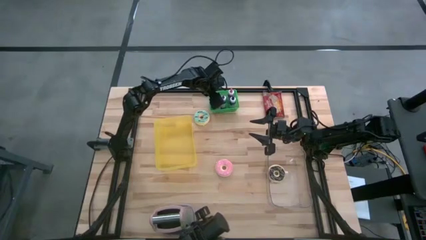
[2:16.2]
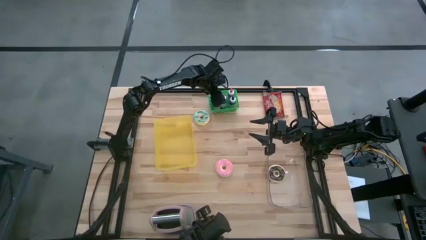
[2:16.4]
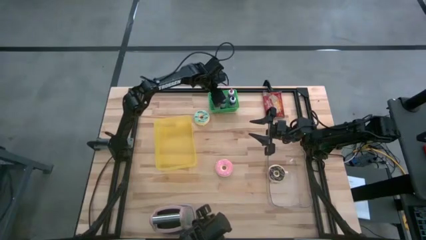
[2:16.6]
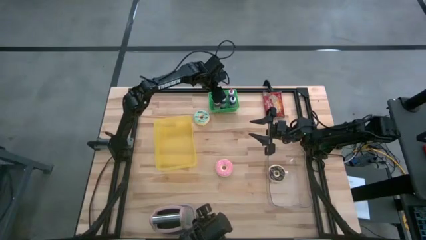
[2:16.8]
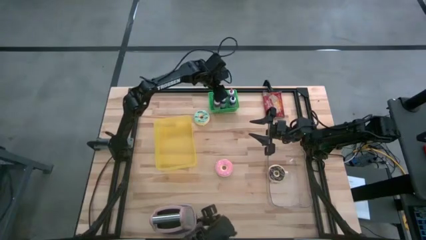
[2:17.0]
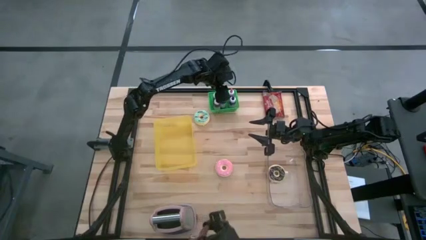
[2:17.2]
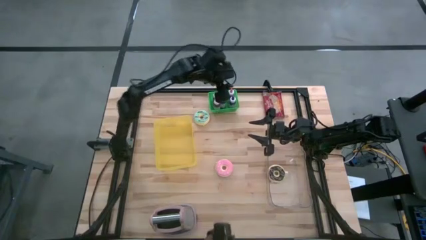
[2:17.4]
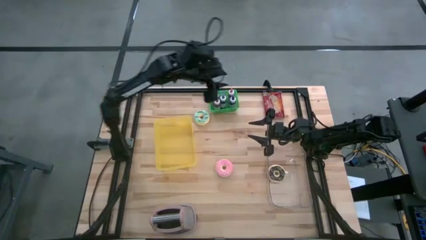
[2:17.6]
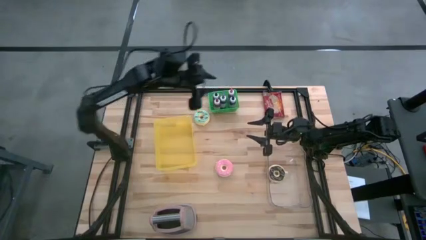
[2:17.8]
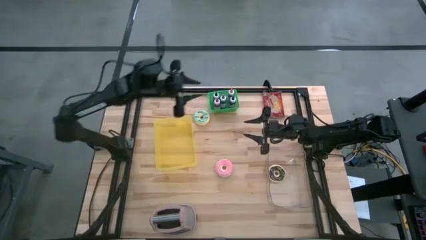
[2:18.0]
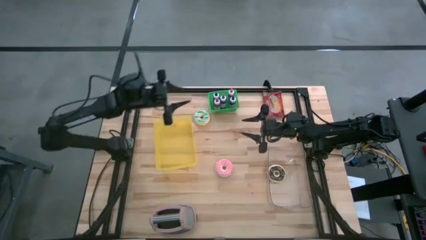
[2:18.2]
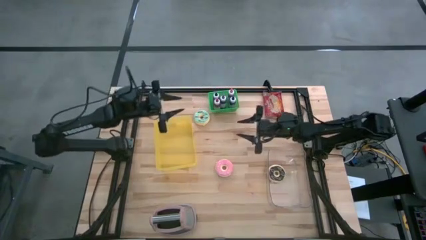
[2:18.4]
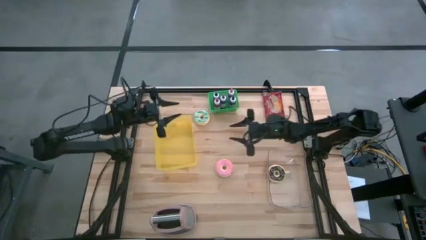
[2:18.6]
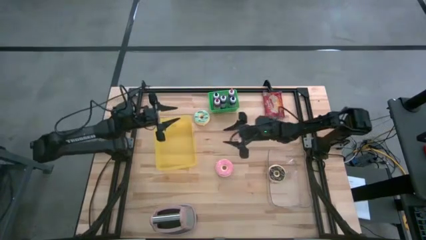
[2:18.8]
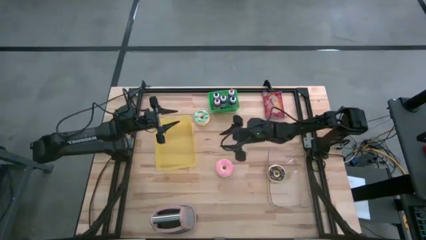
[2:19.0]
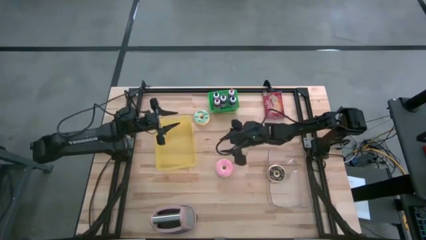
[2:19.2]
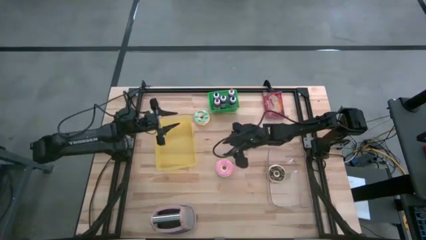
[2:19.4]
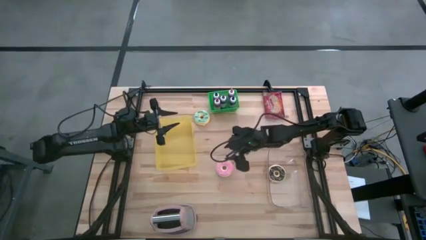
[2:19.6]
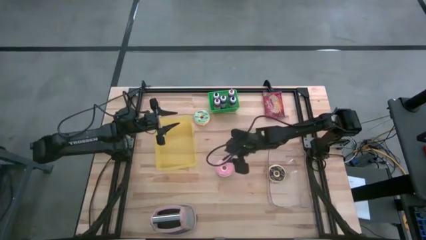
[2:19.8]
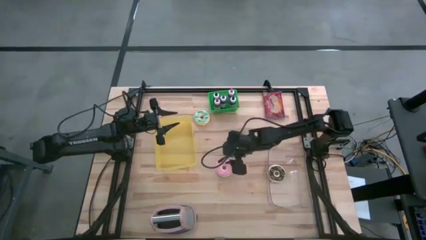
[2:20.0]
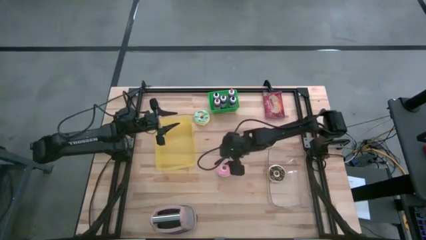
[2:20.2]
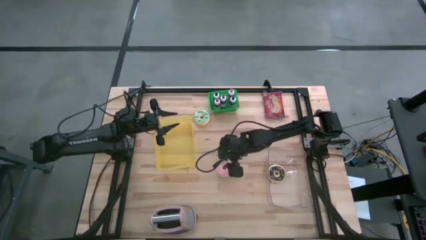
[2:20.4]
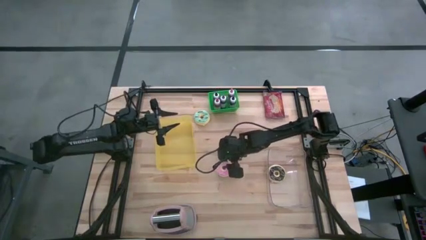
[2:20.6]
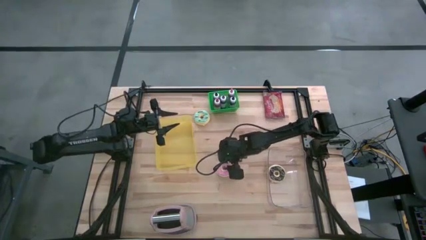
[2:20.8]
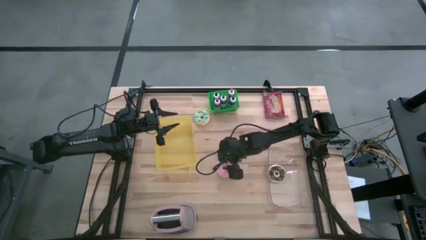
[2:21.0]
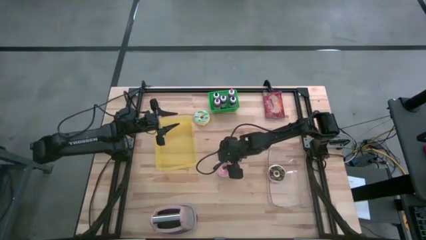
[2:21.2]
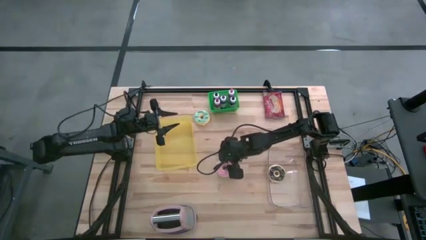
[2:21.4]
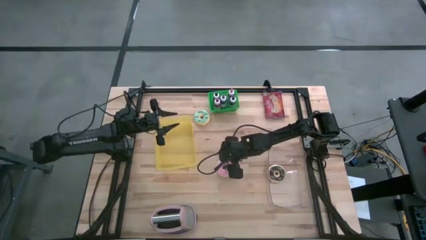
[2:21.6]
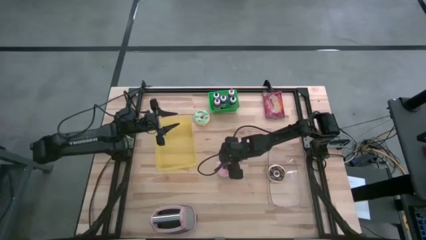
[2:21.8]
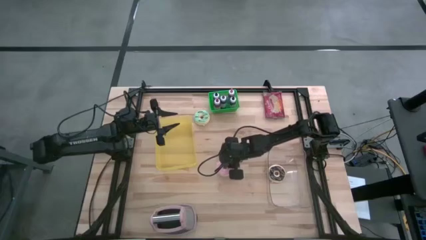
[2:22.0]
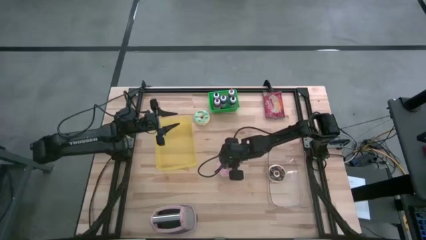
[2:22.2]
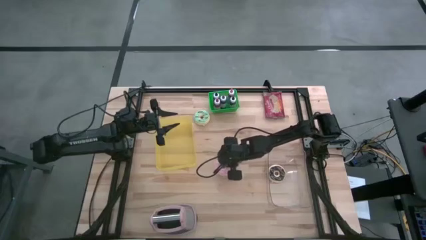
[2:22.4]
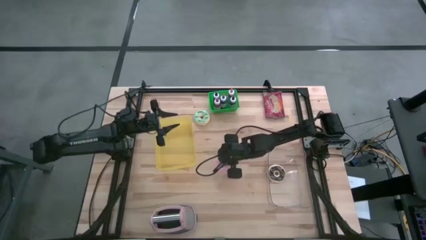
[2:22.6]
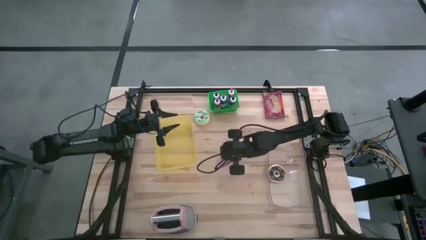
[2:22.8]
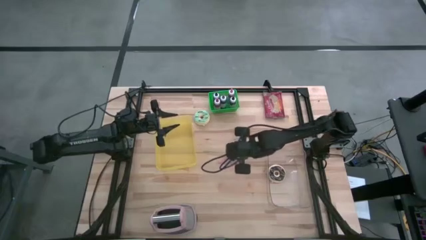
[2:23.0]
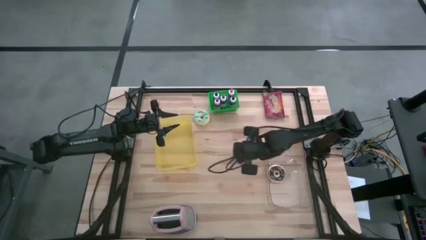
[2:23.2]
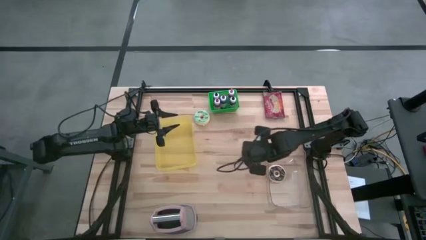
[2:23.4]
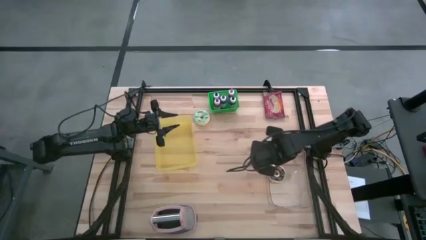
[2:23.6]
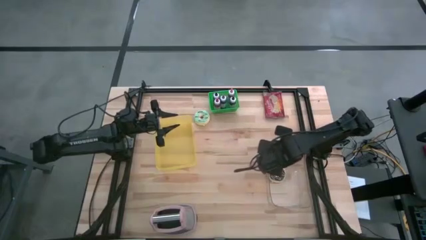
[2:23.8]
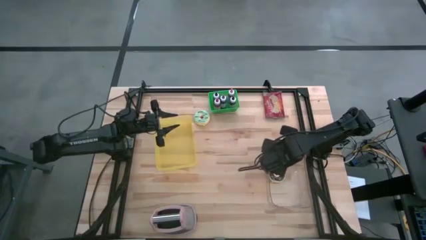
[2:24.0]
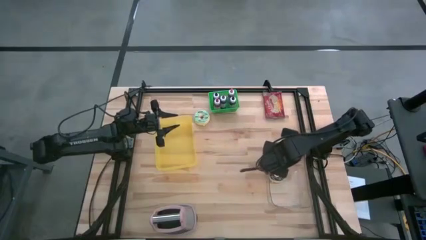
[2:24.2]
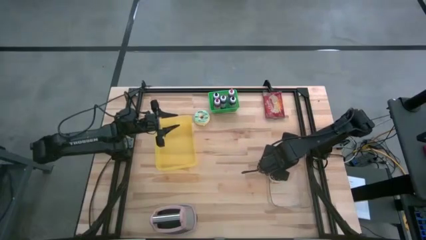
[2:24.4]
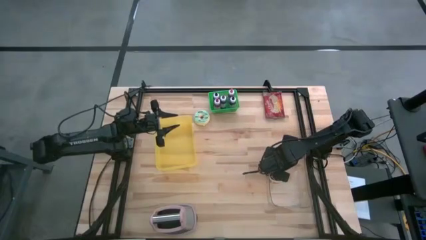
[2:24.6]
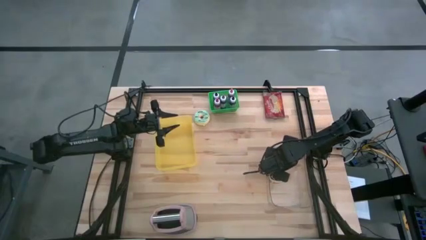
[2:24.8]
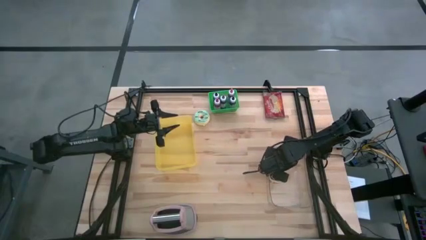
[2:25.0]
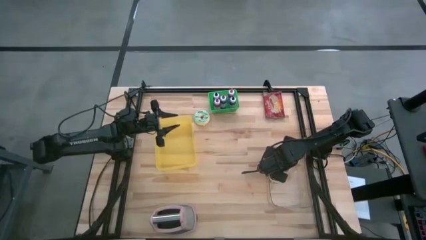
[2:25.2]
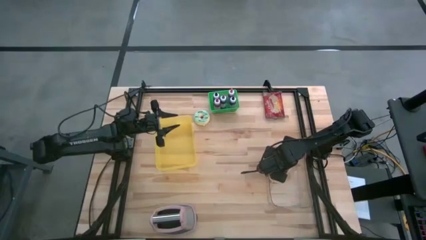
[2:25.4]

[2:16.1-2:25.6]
Task: Pick & Place Food Item
Put the pink donut into the transparent bin

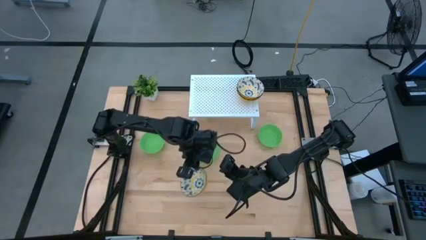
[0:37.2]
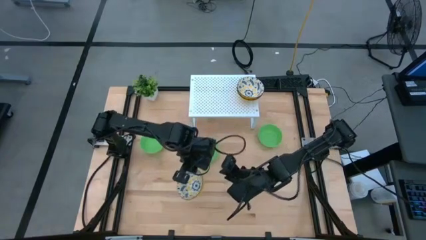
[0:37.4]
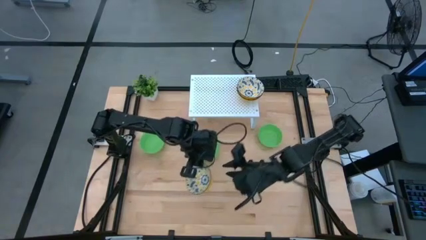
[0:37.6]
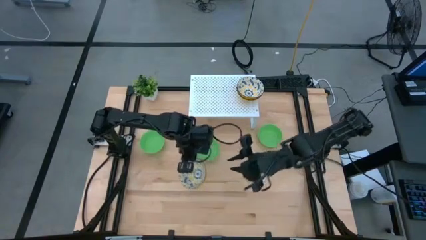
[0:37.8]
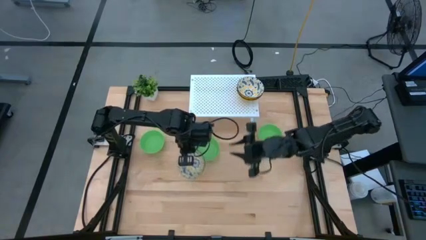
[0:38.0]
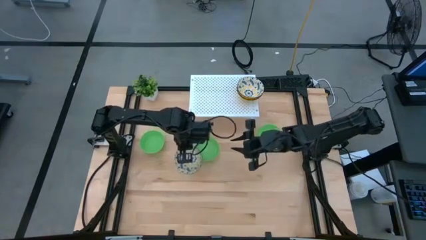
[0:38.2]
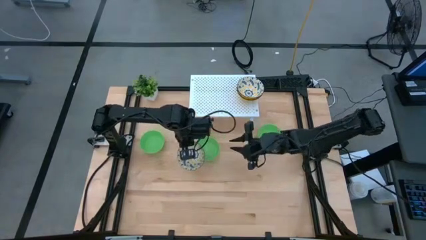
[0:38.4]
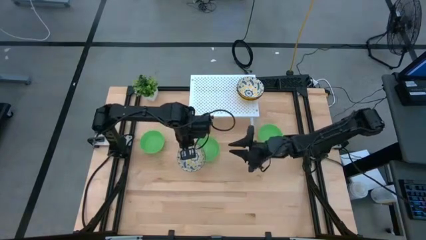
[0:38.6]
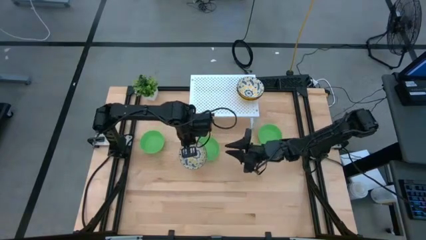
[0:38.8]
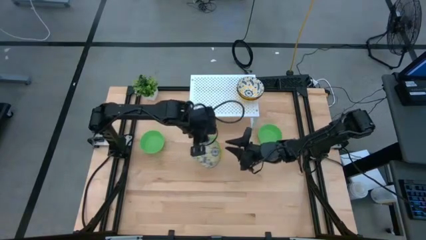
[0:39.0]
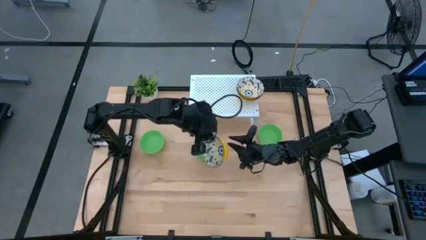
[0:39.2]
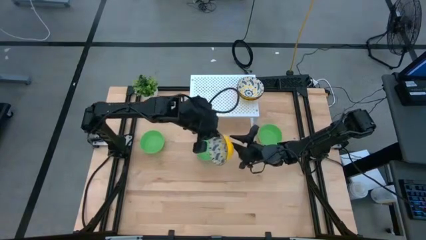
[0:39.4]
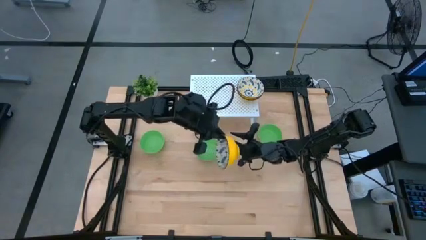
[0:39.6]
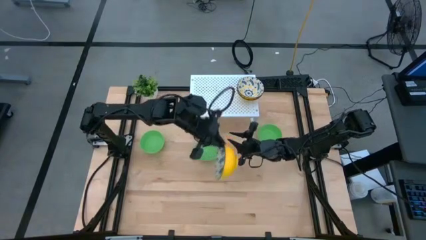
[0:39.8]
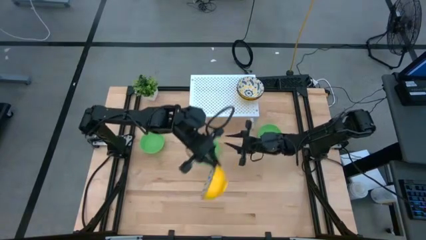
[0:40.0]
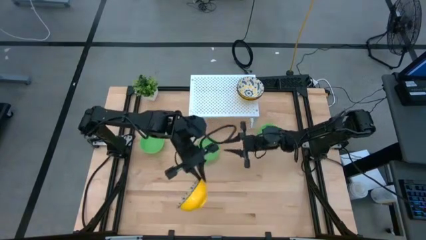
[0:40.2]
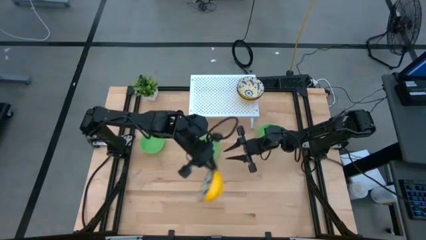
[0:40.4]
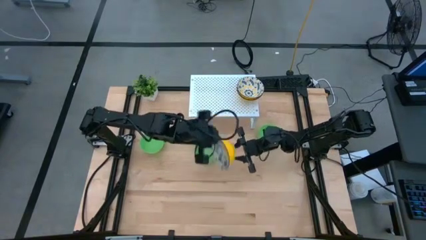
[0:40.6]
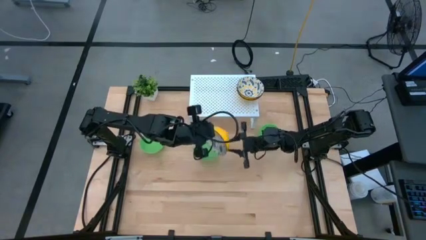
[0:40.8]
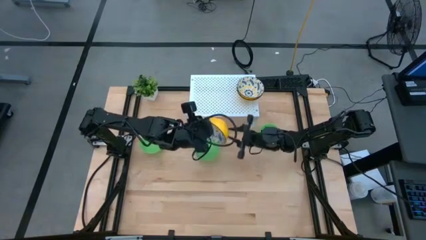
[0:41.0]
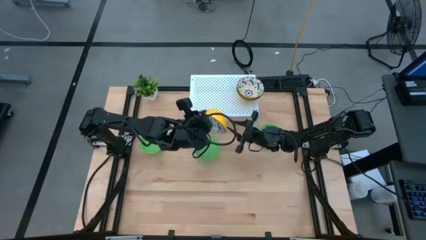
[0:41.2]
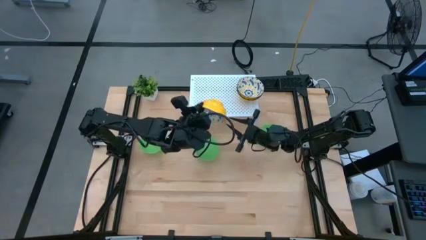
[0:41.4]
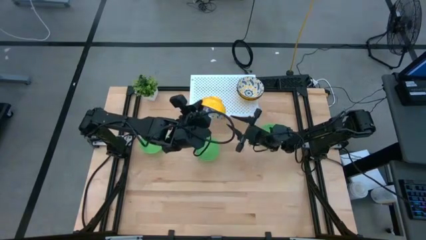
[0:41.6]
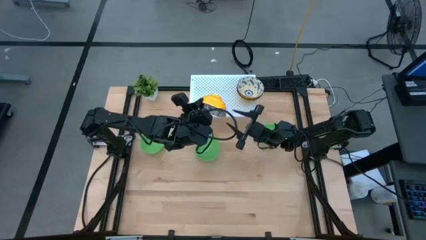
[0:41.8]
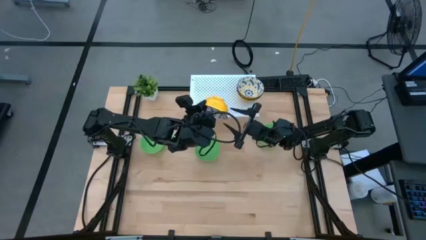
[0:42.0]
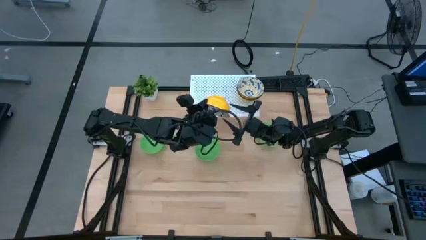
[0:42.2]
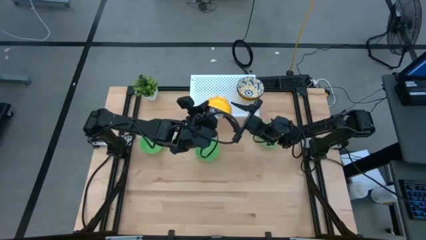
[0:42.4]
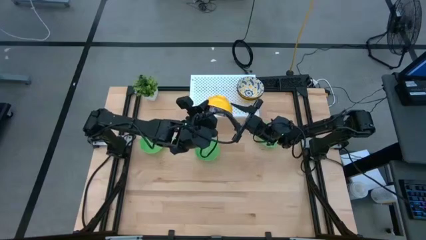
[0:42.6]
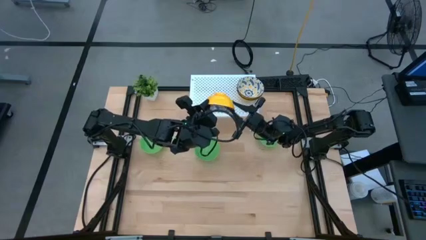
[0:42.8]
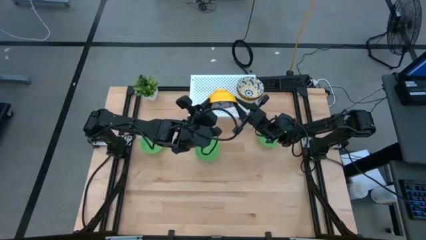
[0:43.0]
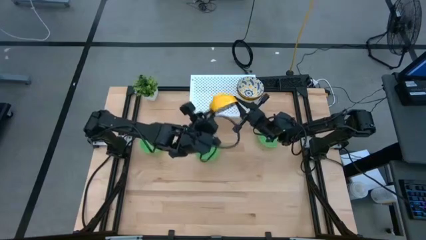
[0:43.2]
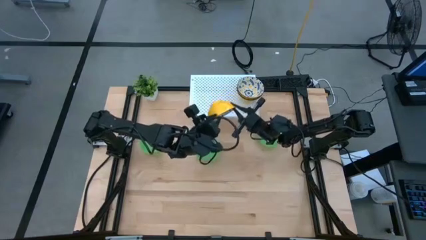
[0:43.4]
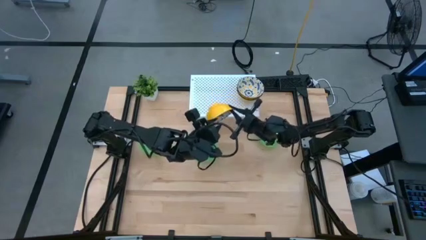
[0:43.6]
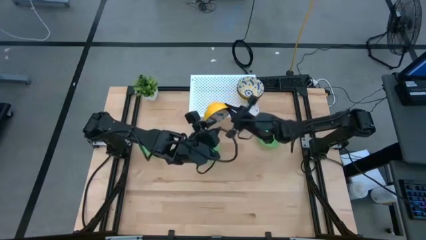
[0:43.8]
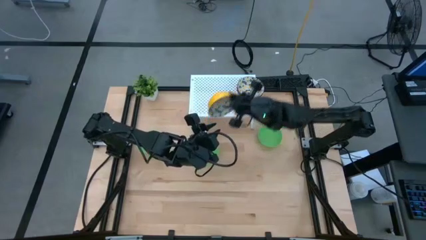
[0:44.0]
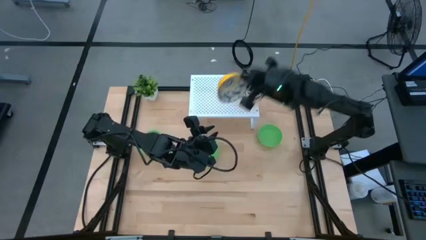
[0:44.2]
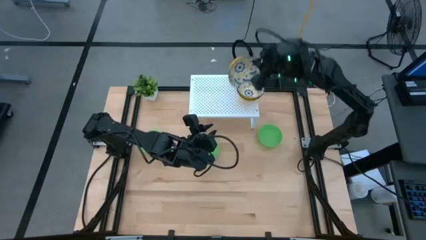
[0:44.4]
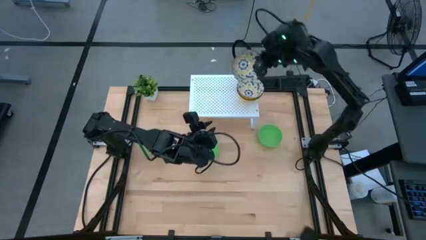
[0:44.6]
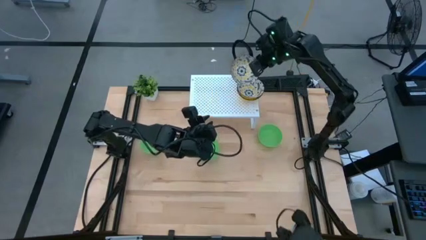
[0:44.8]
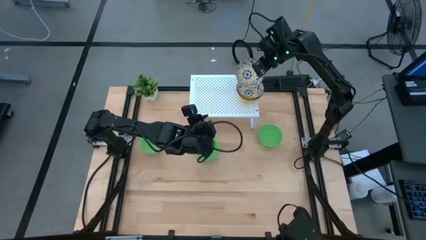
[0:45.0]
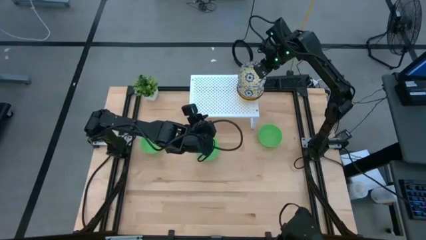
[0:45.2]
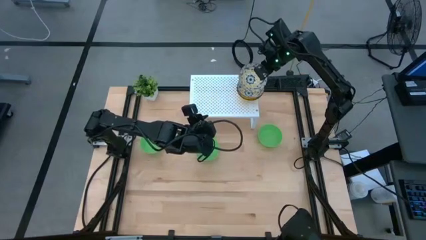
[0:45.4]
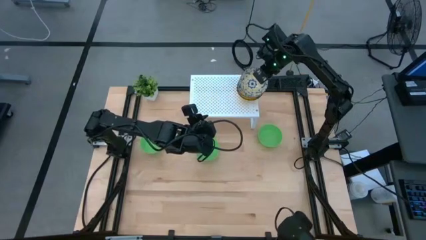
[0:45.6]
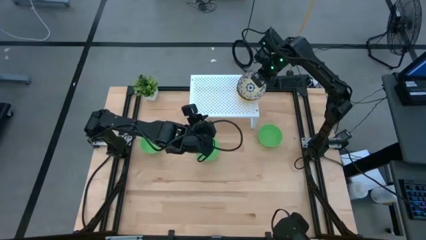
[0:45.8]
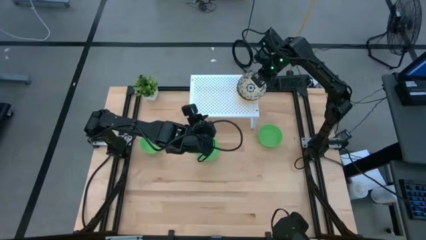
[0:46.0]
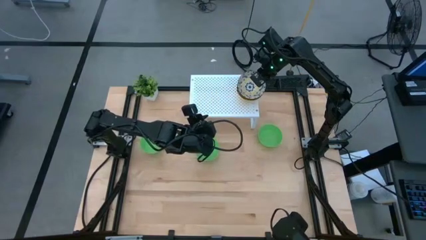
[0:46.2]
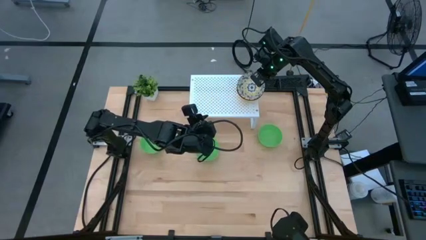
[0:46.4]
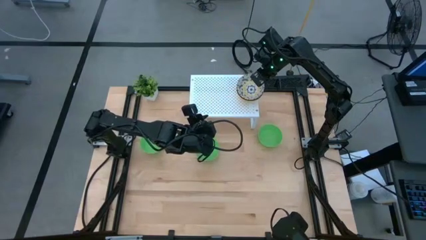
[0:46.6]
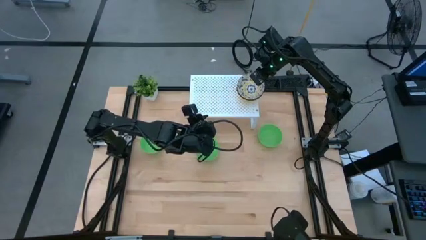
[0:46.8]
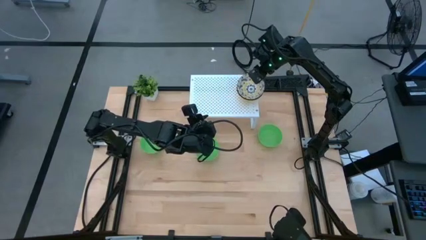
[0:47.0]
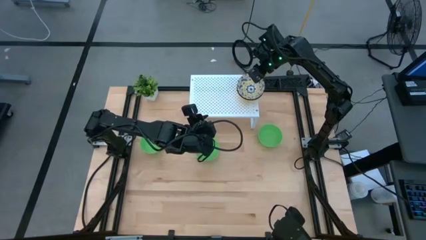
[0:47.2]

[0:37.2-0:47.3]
Task: Pick & Place Mini bowls
Stack the blue and yellow patterned bowl on top of the blue and yellow patterned bowls on the shelf
